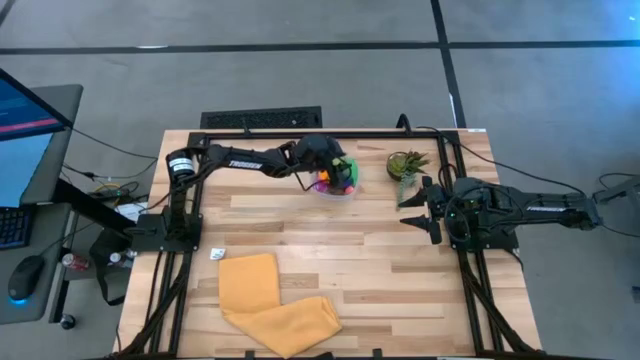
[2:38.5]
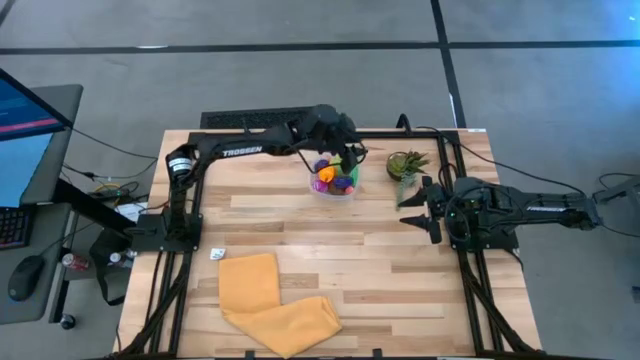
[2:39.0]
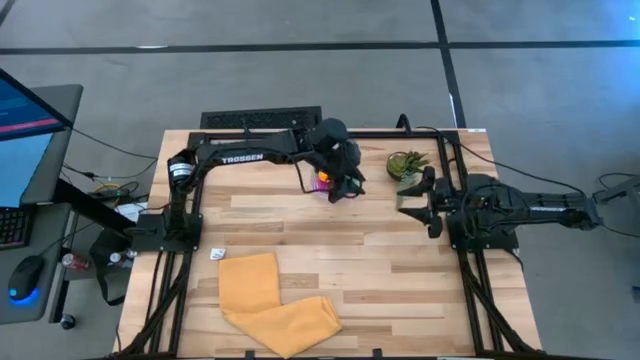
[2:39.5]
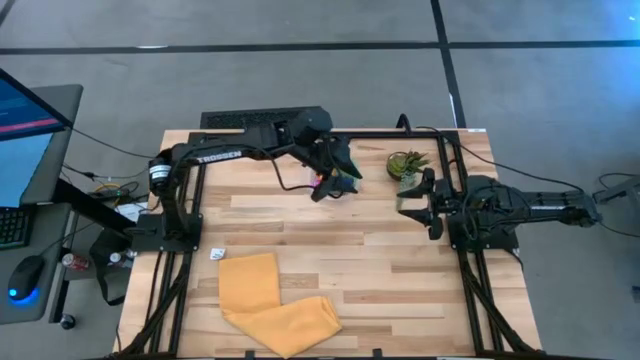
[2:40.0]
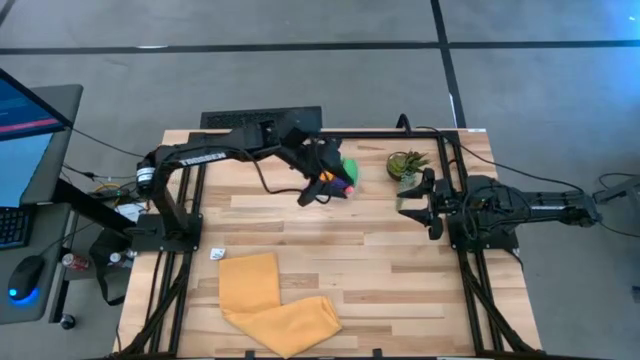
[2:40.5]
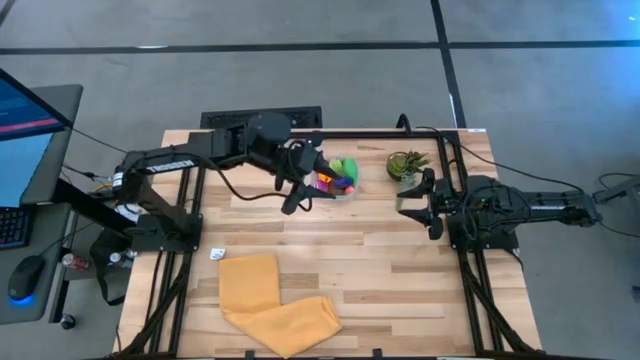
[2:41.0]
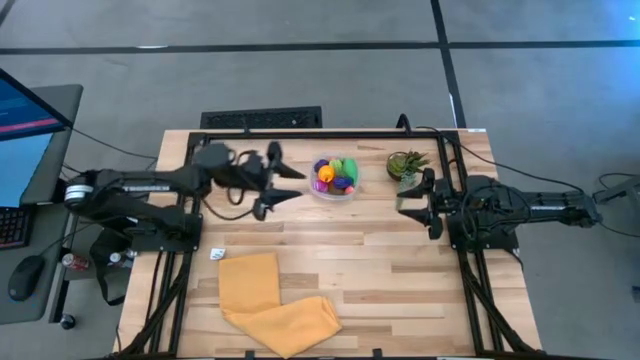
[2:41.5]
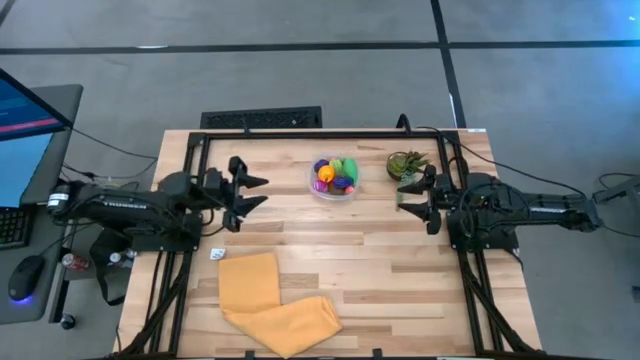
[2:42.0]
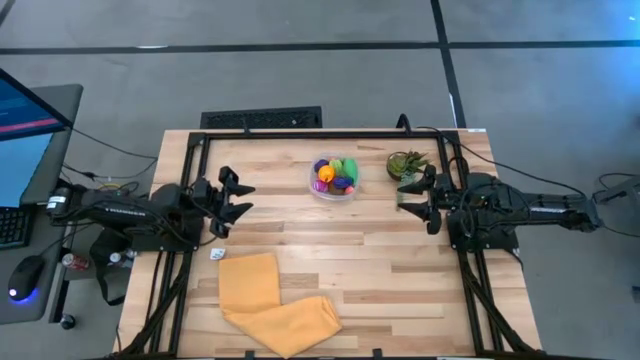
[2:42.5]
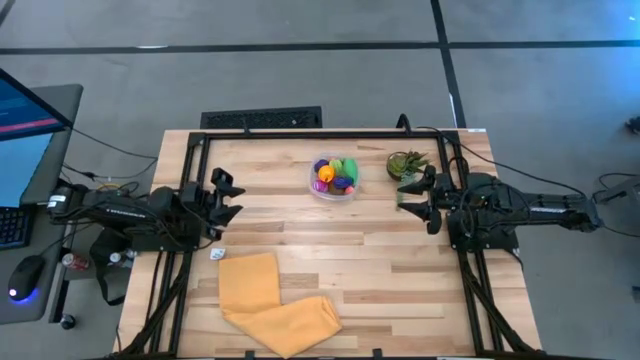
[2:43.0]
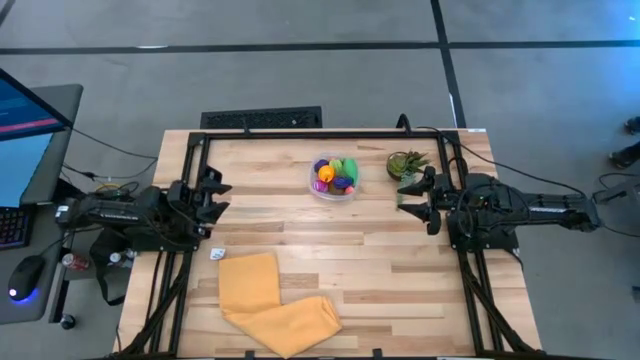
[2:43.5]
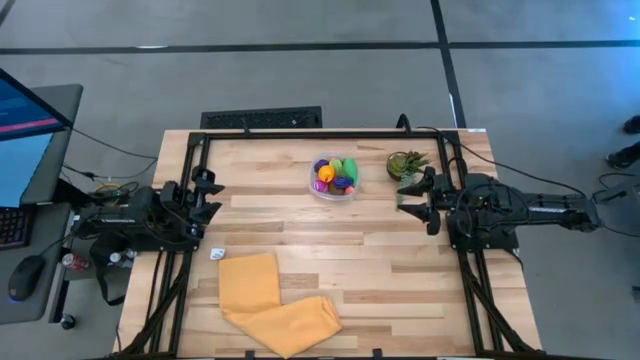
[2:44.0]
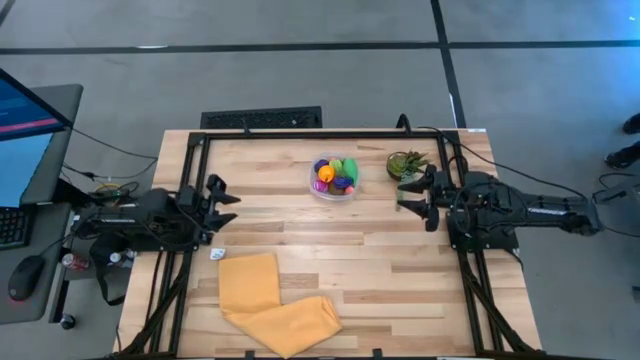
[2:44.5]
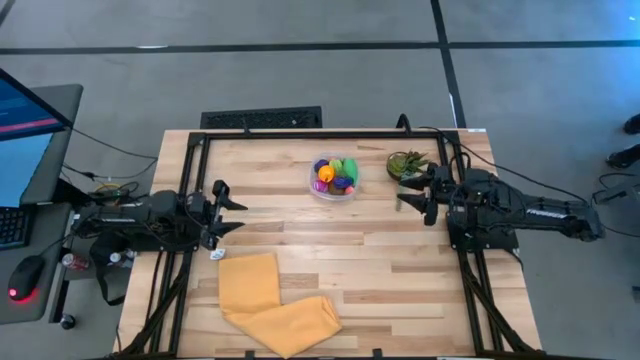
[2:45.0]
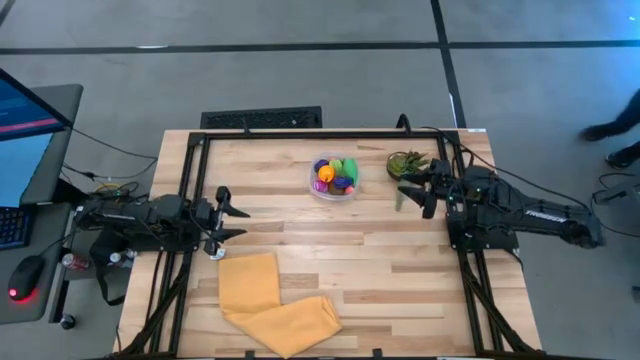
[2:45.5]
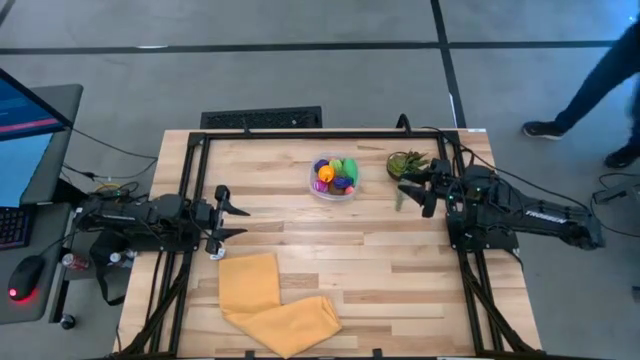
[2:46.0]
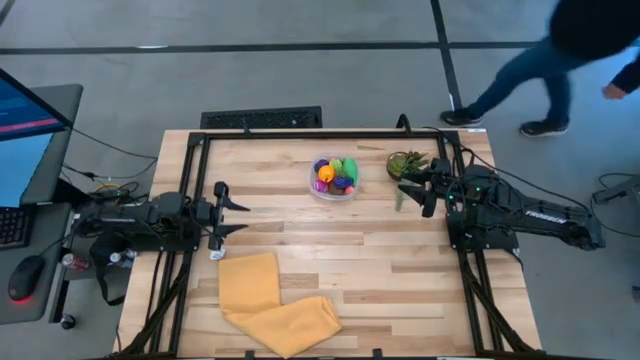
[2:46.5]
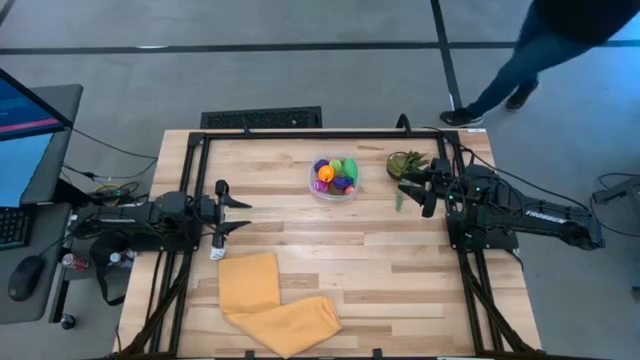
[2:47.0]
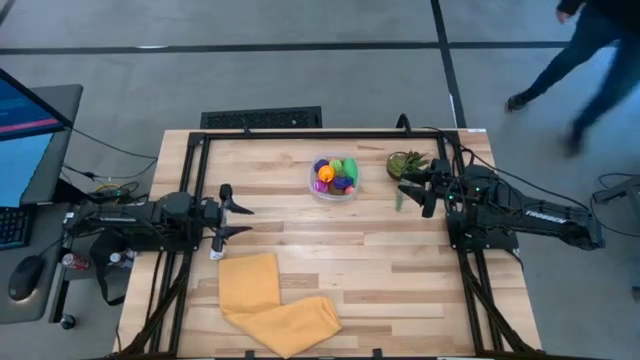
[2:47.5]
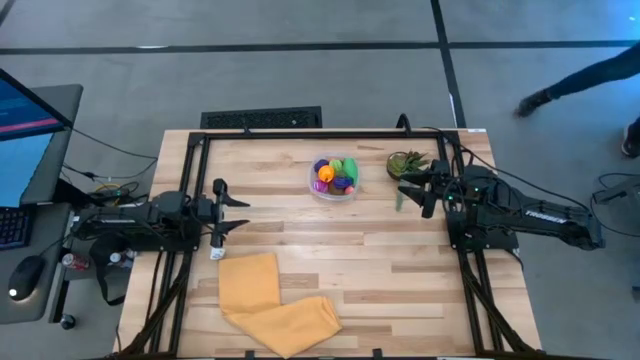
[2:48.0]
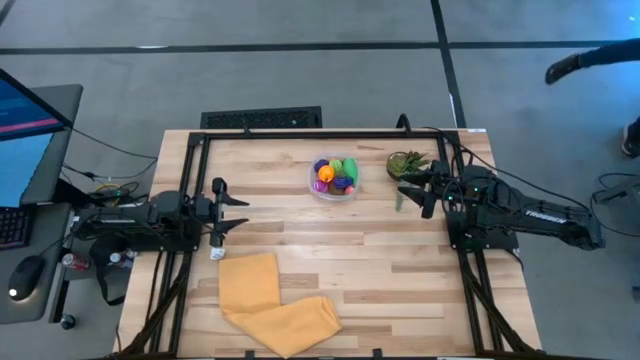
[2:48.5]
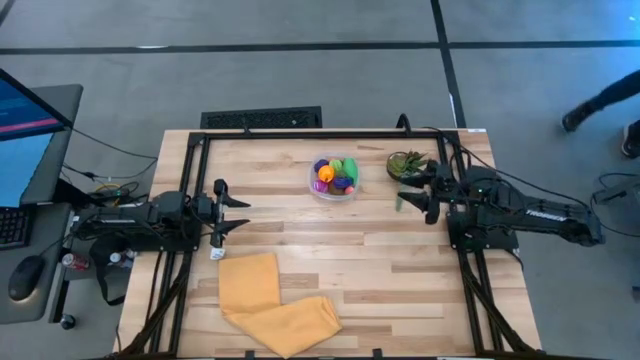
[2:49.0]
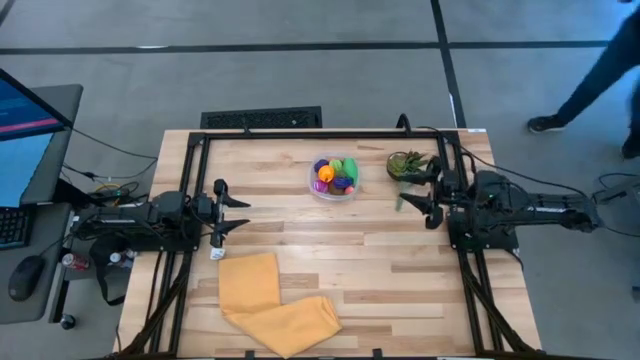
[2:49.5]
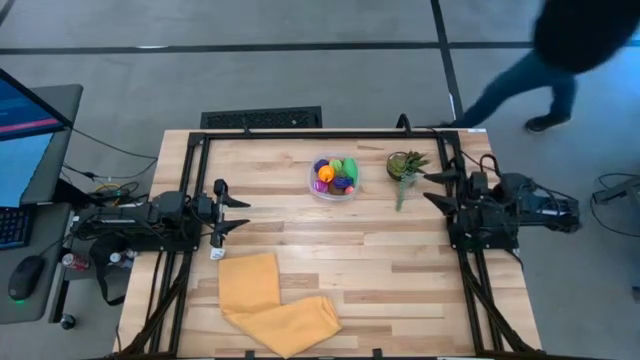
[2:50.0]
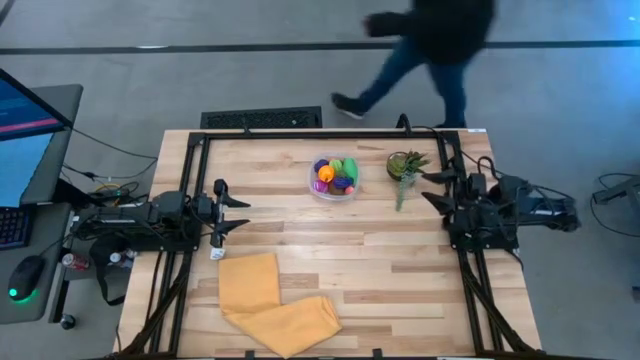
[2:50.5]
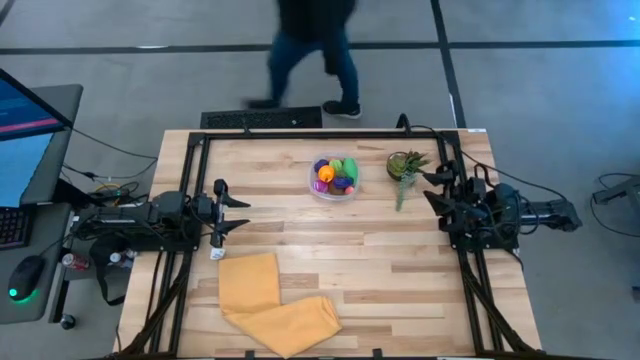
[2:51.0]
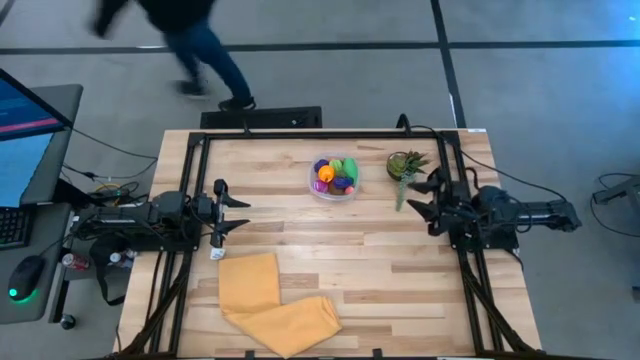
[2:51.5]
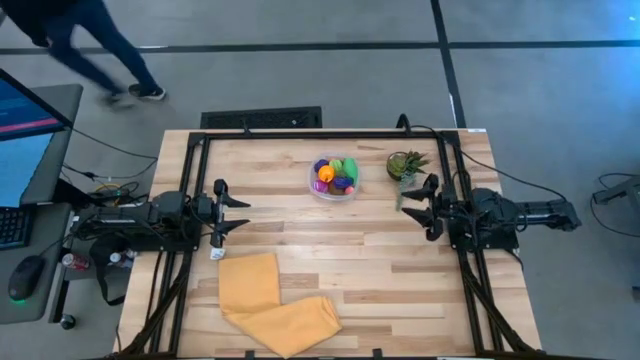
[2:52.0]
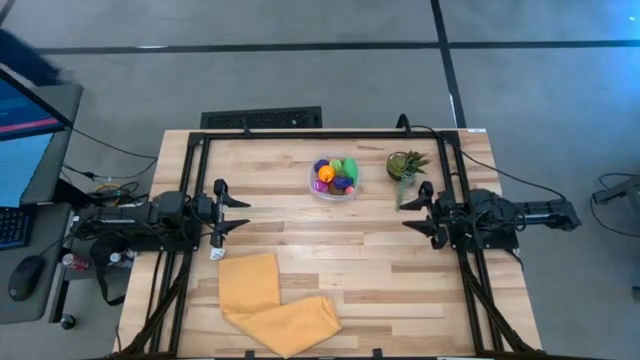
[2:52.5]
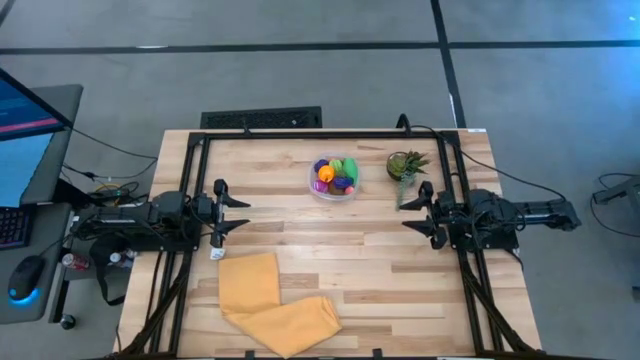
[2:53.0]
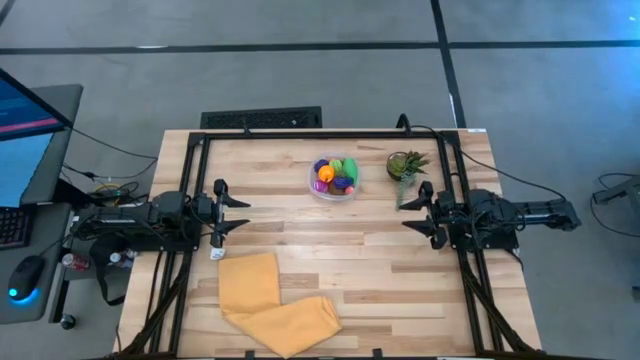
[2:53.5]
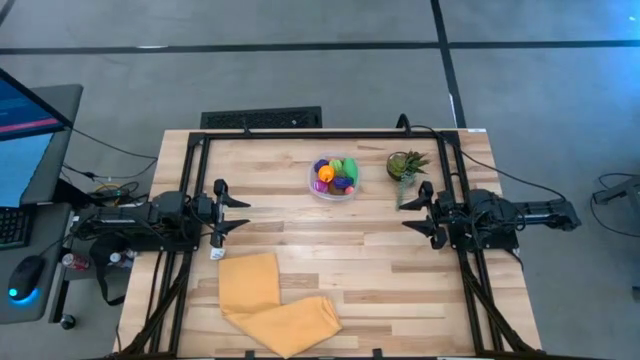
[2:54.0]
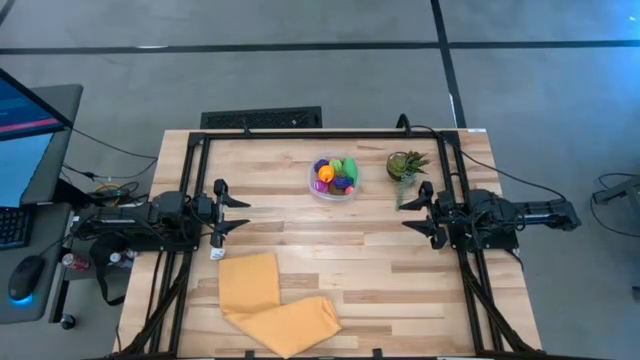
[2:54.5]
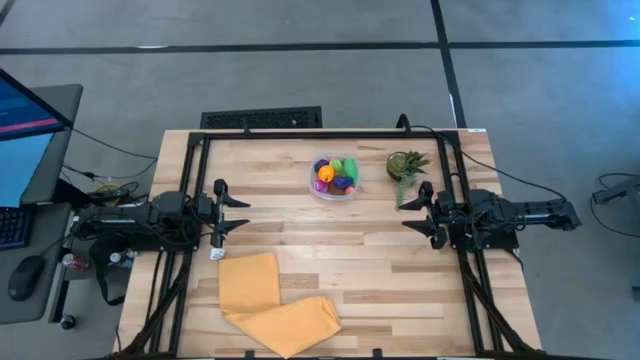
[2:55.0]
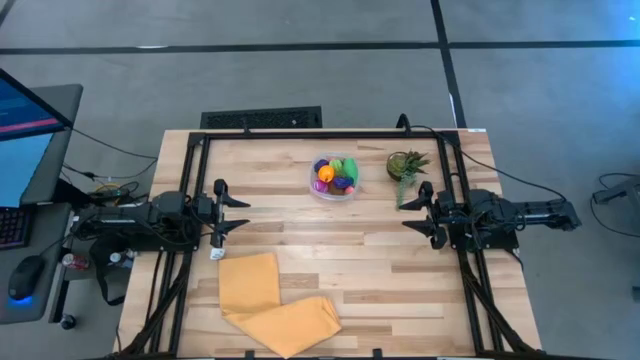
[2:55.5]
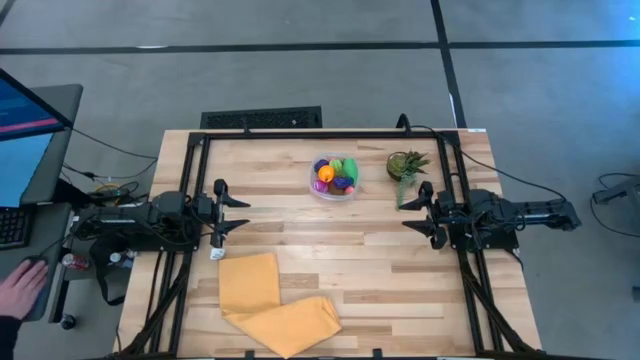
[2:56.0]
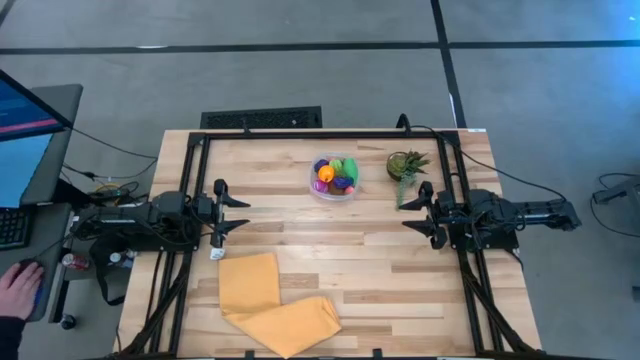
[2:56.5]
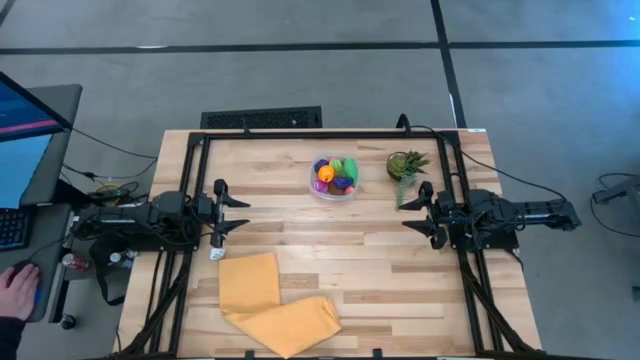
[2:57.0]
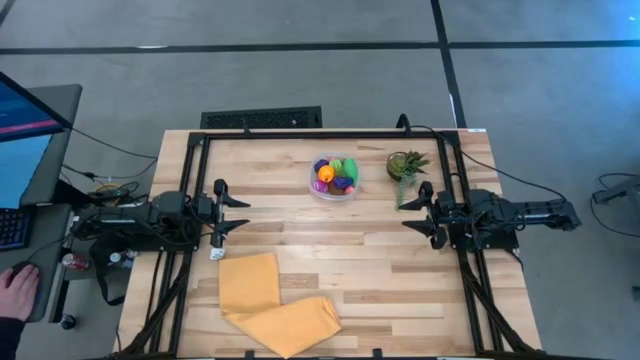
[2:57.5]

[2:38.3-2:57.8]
Task: Pick and placing Produce into tupperware
Return to Home Position

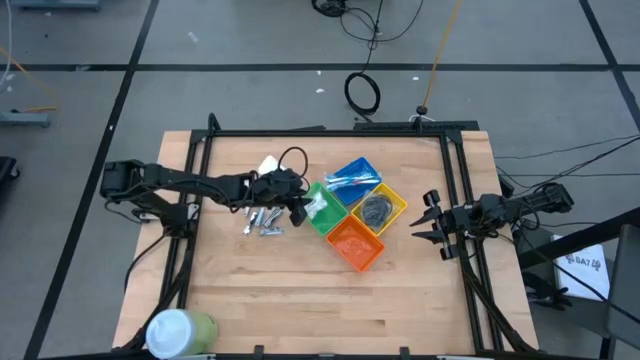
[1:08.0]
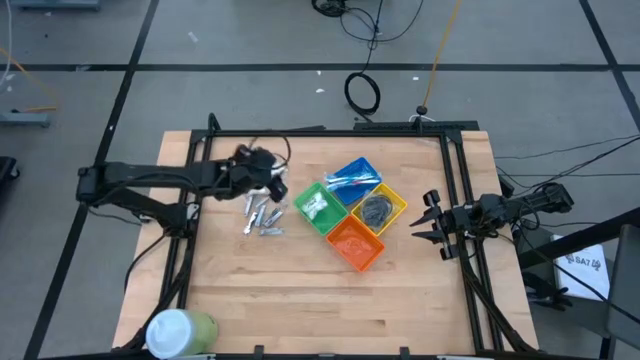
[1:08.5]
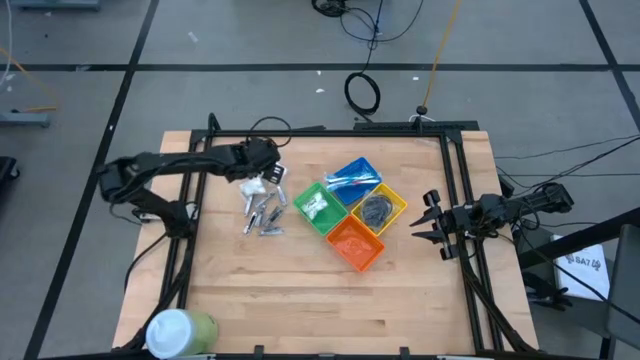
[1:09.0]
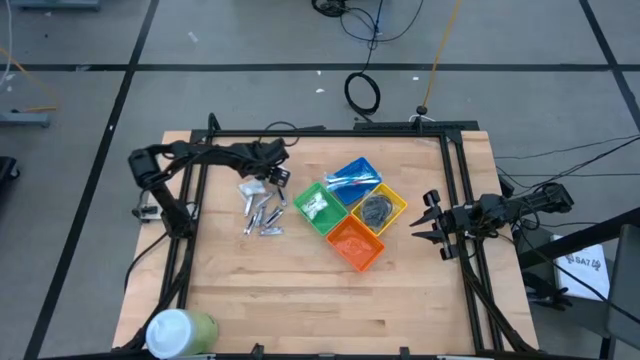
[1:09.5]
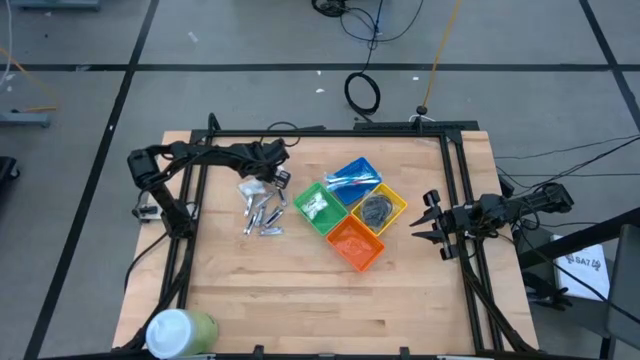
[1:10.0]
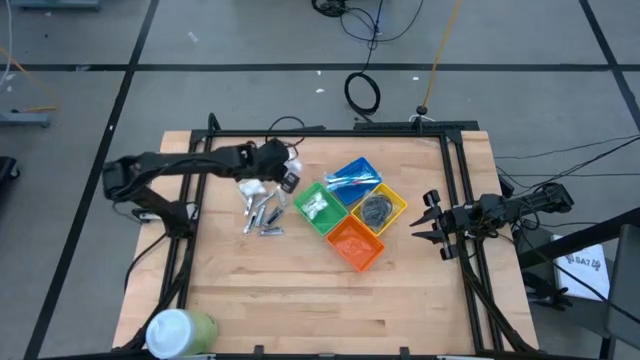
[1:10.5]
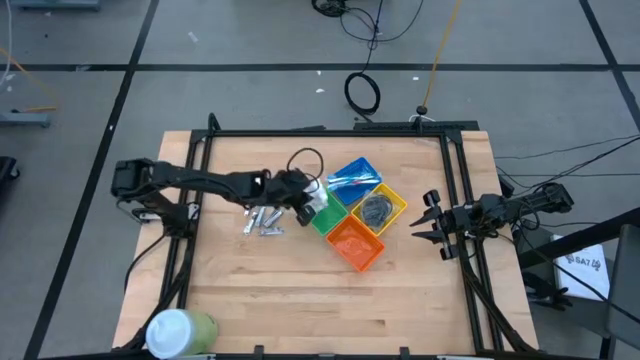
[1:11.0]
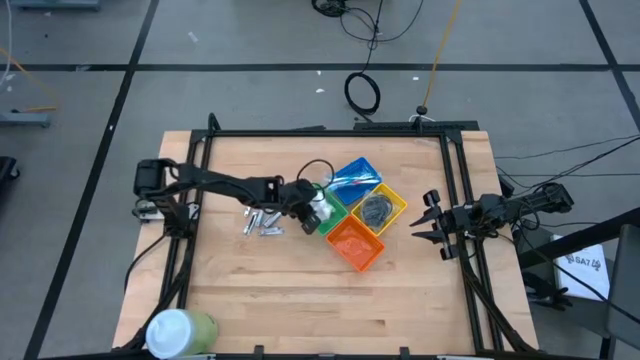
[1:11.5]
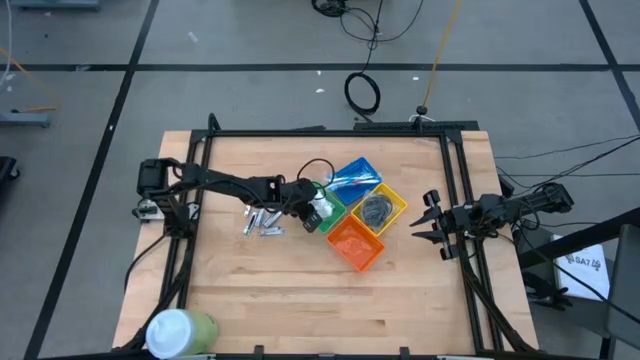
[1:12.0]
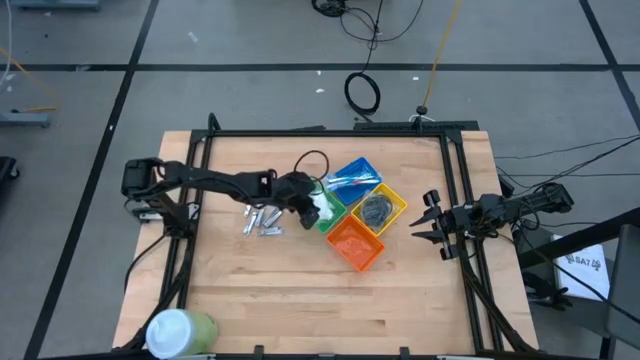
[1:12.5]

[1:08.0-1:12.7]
Task: Pick & Place Travel size toiletries
Put the white cotton pack into the green bin
